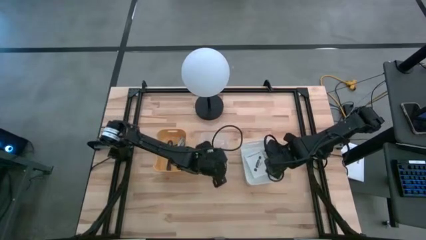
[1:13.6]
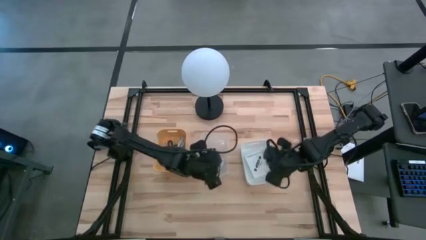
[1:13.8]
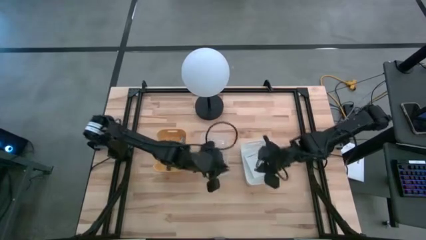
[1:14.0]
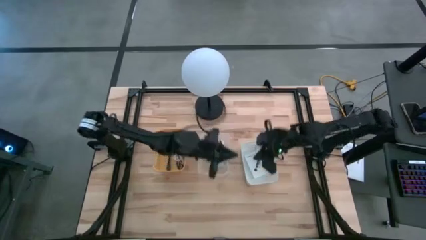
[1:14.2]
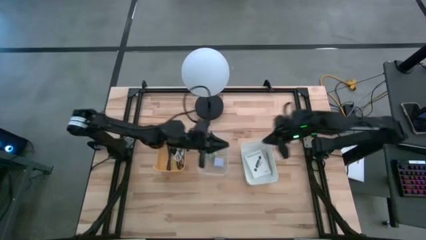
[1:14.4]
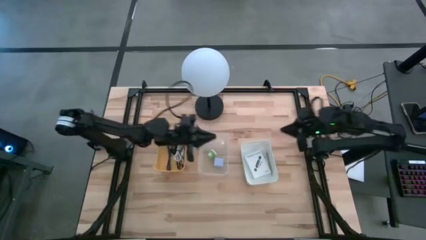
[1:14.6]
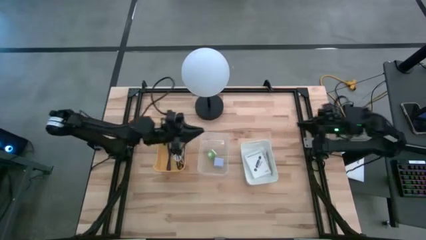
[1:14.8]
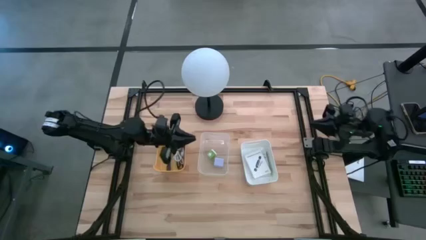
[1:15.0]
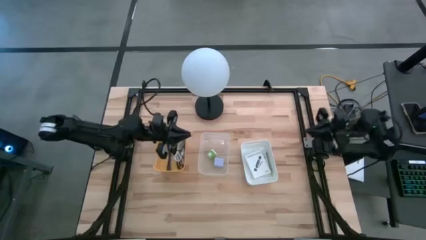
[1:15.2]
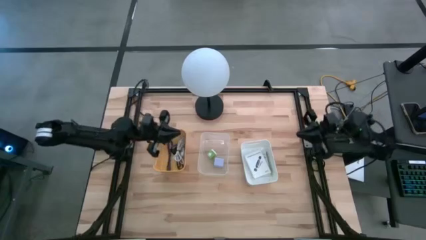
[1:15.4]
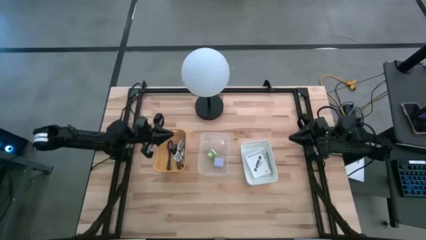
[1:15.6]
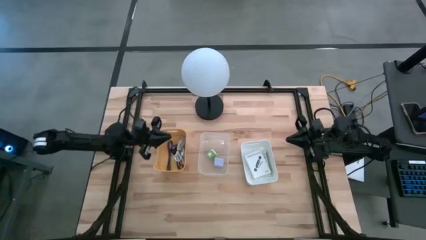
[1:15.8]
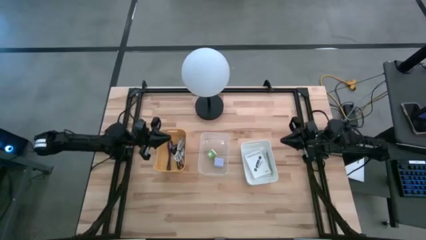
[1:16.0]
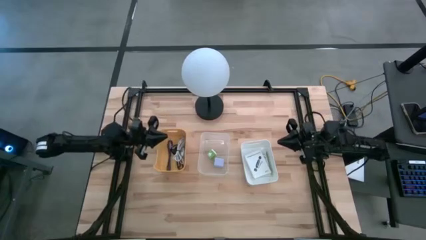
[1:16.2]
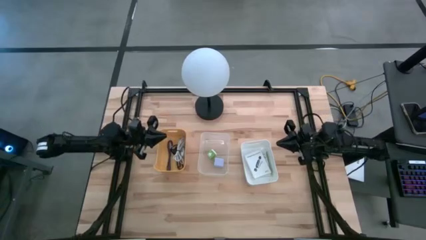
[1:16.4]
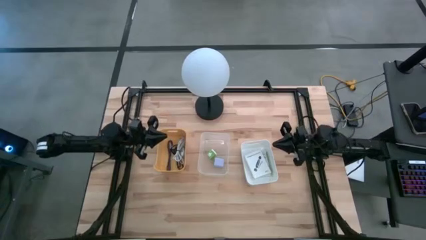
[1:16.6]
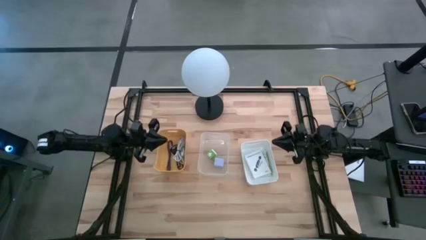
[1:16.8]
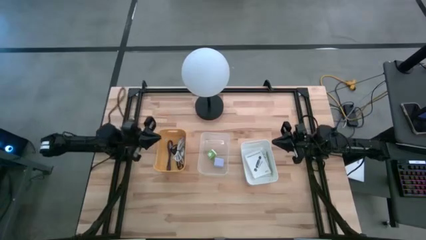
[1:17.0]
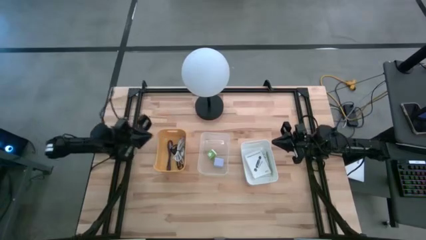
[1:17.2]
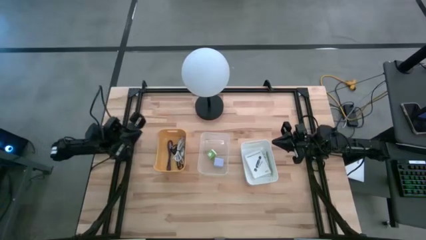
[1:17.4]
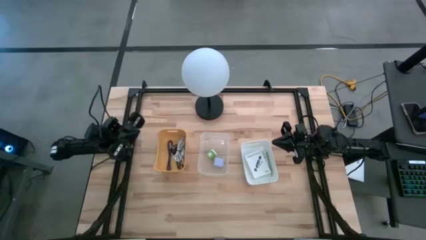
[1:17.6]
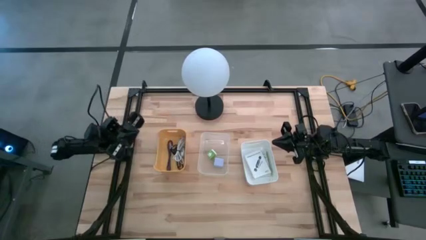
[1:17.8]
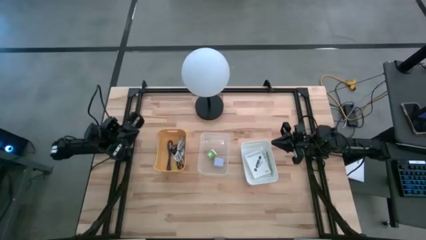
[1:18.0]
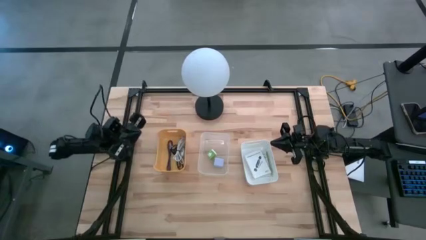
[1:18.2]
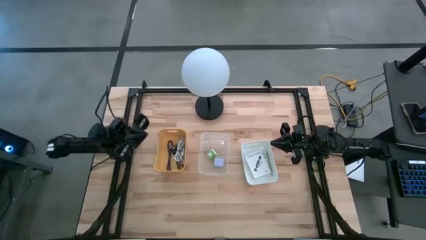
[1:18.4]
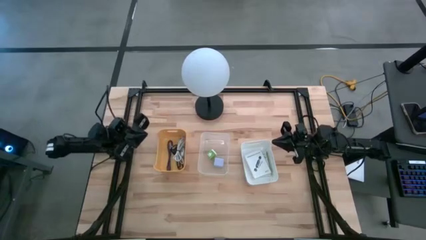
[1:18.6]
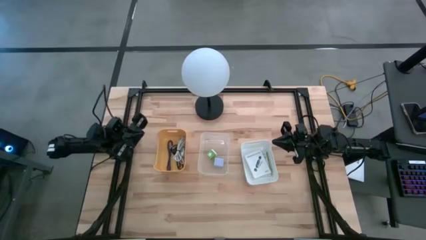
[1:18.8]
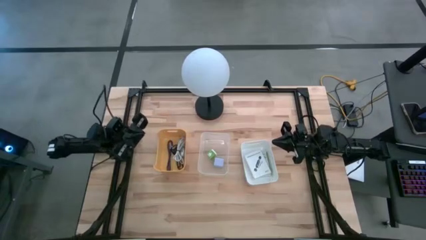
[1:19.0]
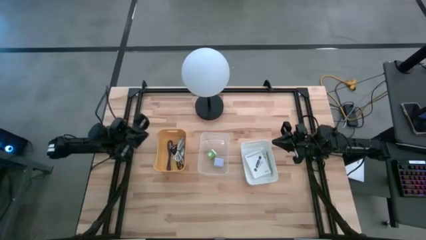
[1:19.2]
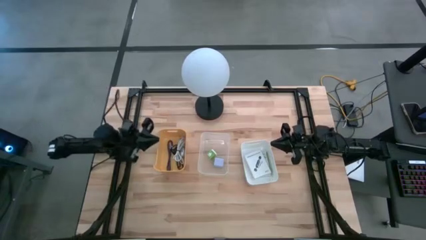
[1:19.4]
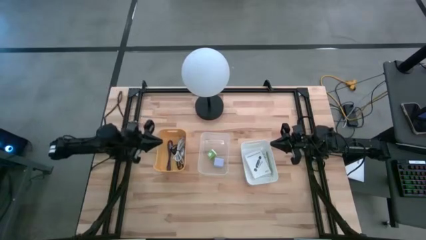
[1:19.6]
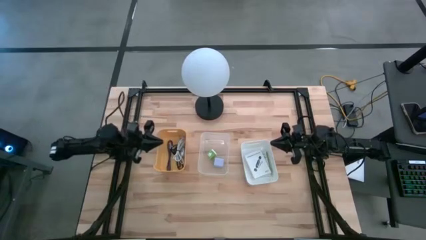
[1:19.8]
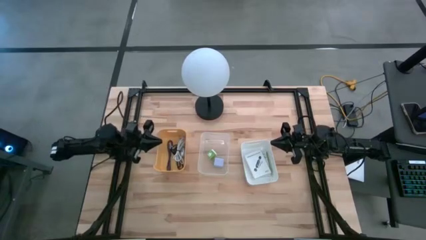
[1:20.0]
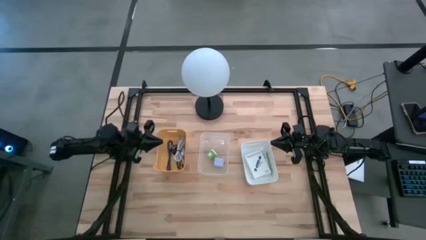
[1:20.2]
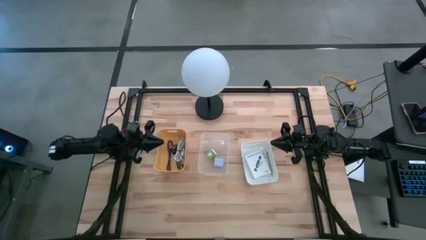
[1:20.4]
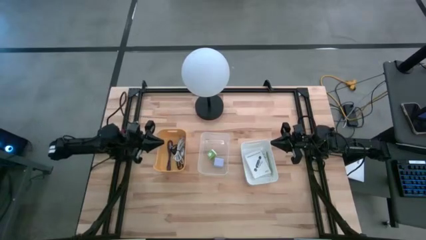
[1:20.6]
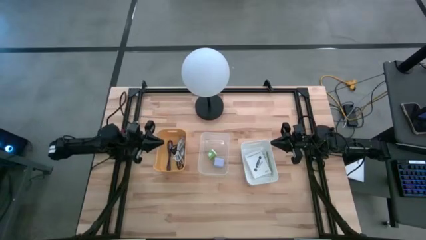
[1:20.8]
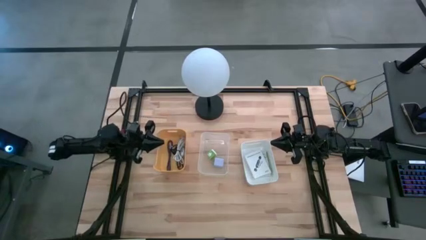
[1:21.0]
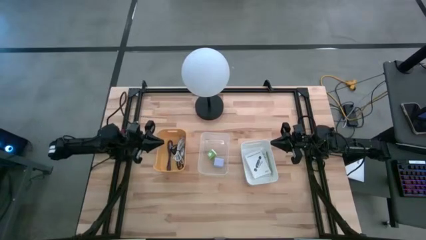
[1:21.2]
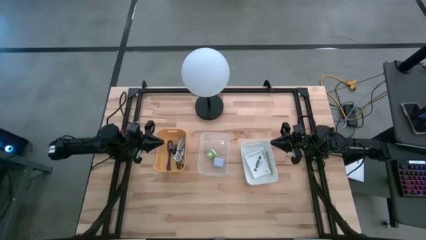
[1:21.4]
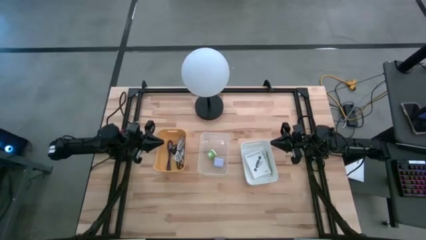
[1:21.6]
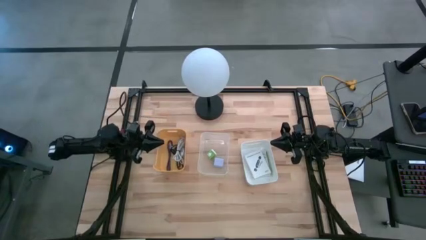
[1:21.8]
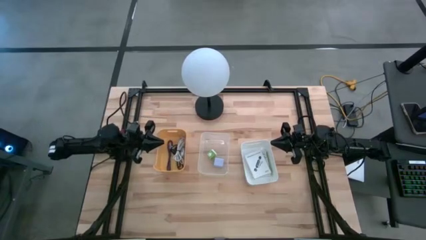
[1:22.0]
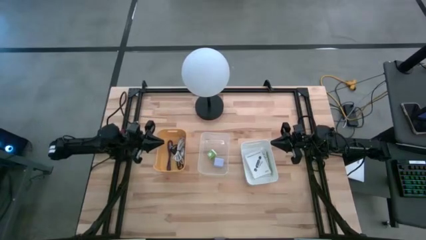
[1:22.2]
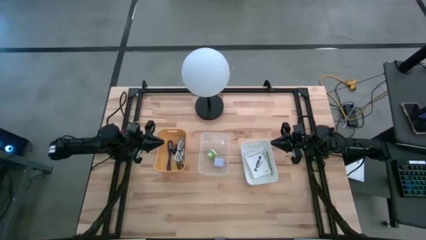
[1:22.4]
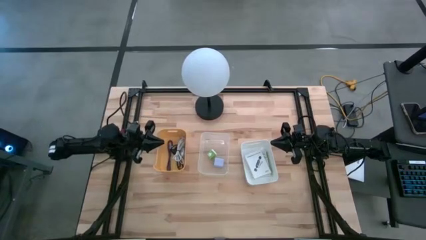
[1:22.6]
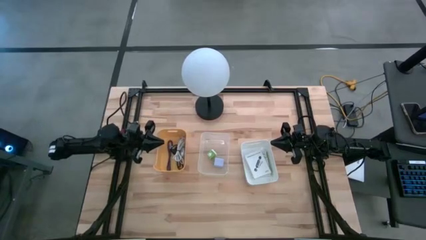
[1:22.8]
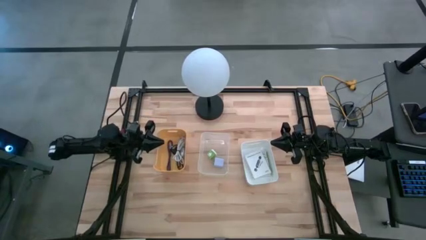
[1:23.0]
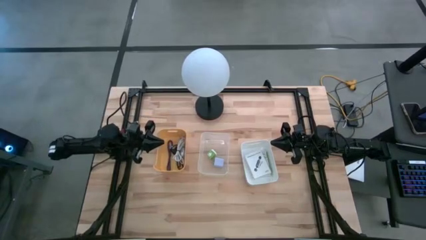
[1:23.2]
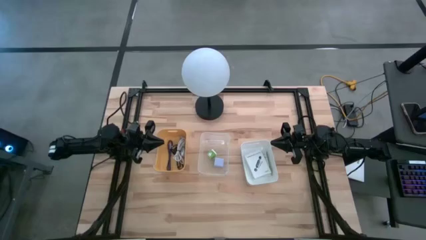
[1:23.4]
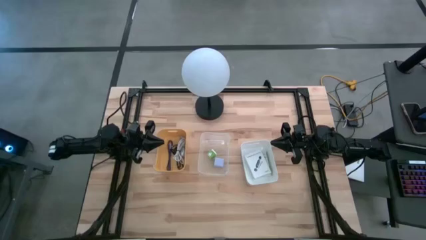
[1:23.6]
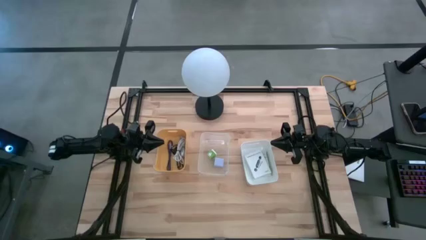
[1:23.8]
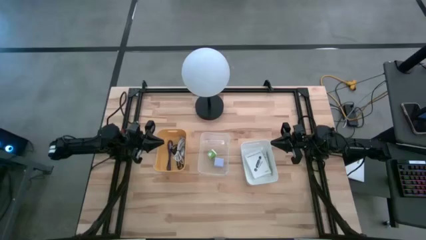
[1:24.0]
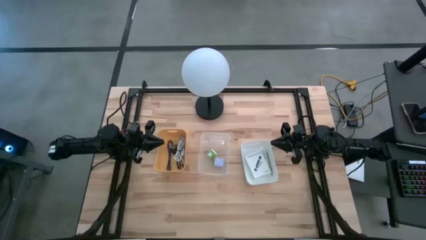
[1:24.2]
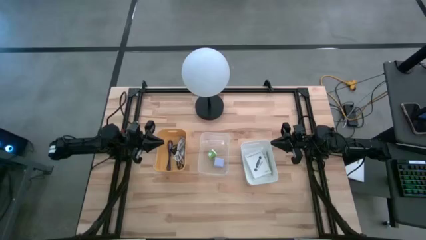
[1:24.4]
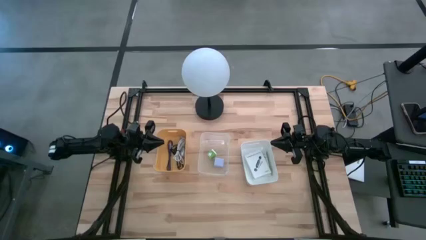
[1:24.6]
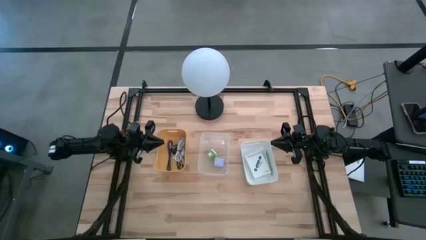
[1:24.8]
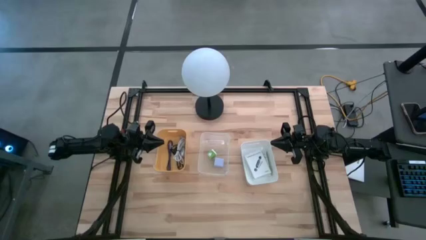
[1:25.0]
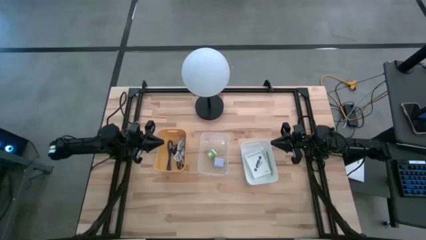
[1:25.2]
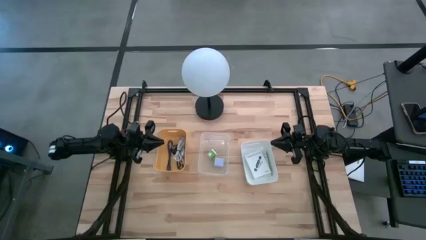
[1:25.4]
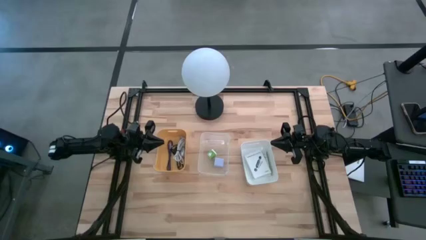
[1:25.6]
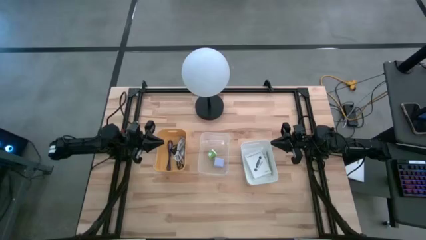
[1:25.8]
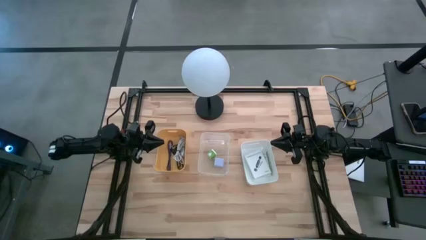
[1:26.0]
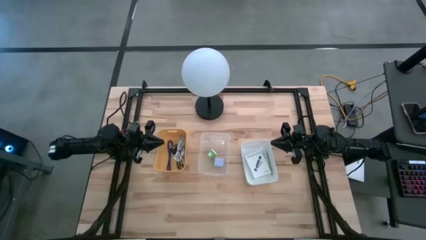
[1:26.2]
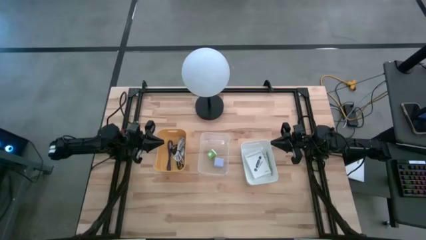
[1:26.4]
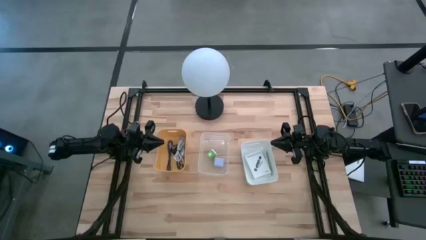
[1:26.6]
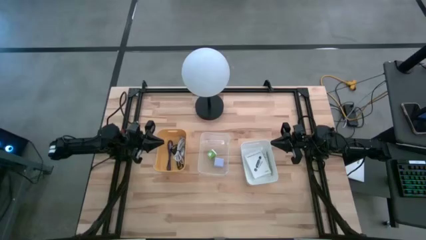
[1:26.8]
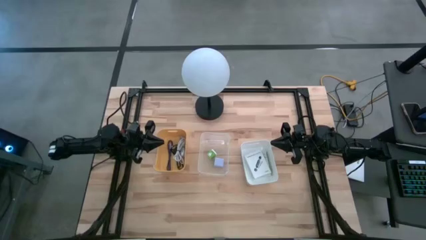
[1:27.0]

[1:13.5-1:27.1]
Task: Pick and place items into bin
Return to Home Position

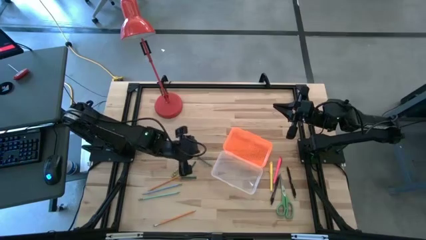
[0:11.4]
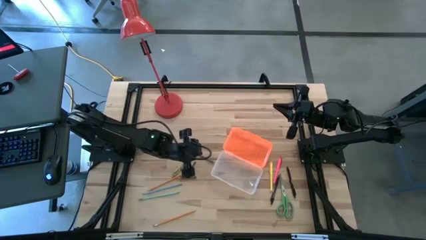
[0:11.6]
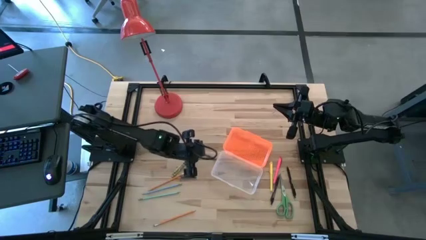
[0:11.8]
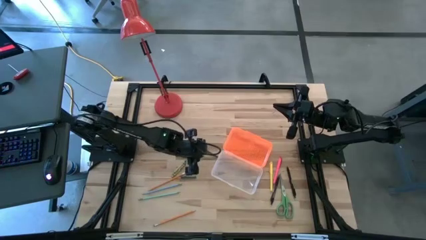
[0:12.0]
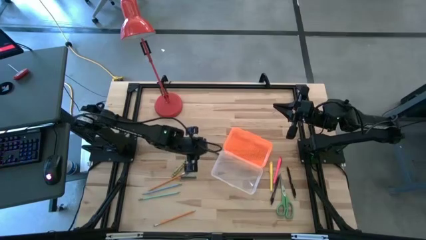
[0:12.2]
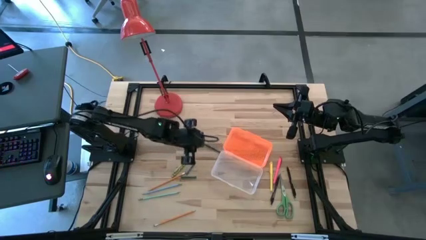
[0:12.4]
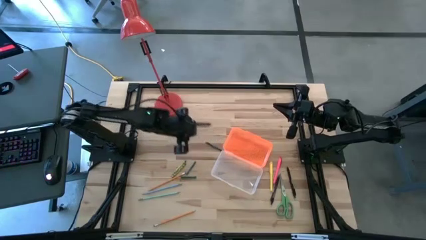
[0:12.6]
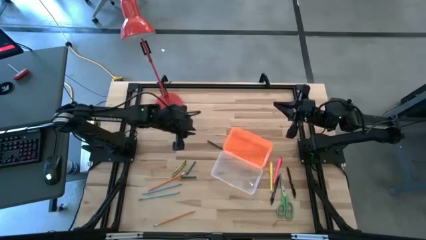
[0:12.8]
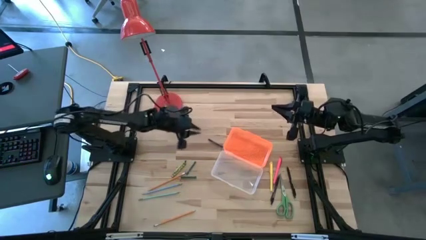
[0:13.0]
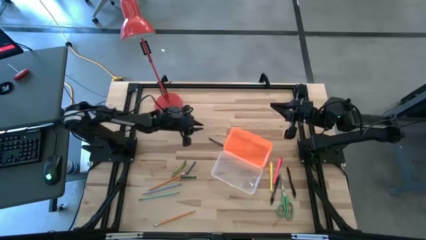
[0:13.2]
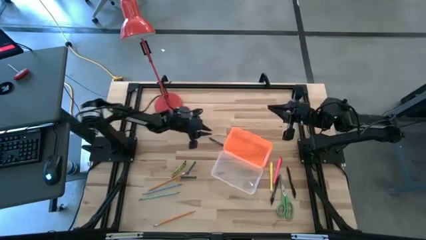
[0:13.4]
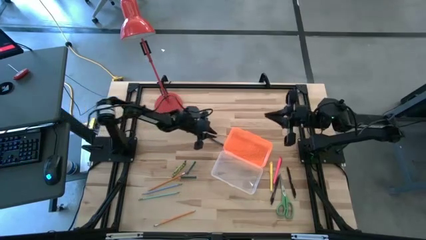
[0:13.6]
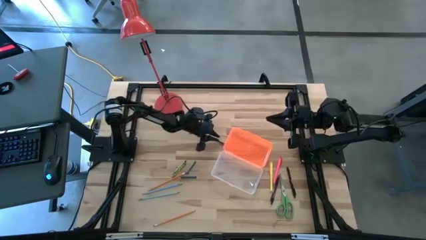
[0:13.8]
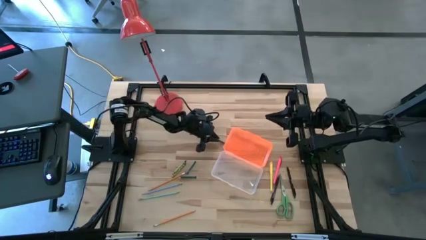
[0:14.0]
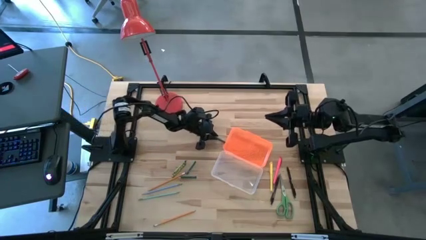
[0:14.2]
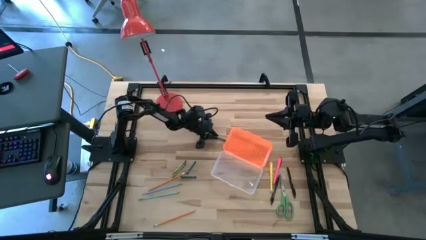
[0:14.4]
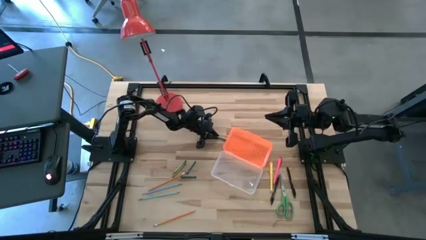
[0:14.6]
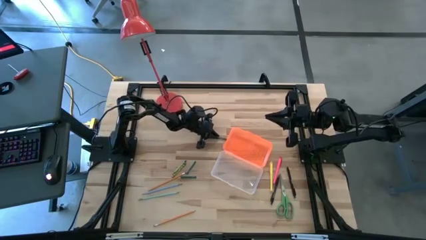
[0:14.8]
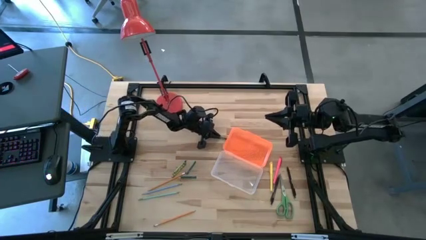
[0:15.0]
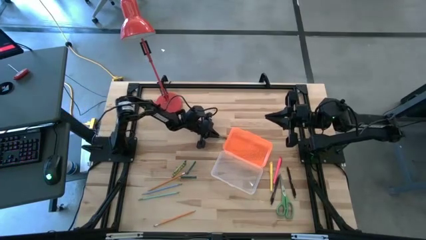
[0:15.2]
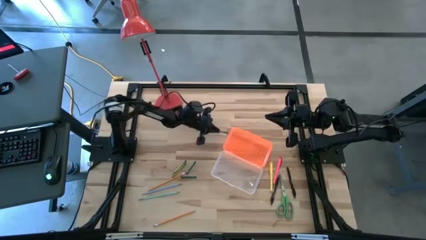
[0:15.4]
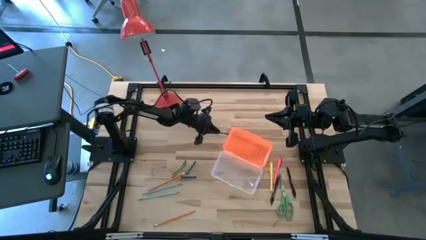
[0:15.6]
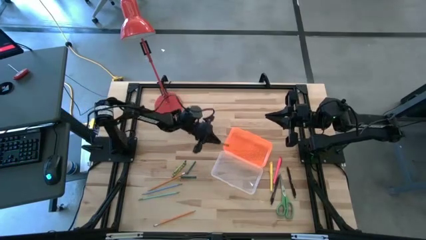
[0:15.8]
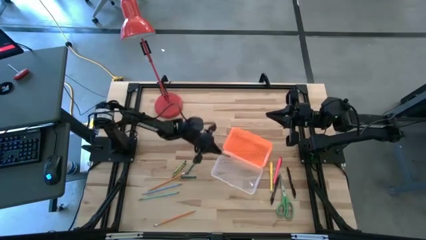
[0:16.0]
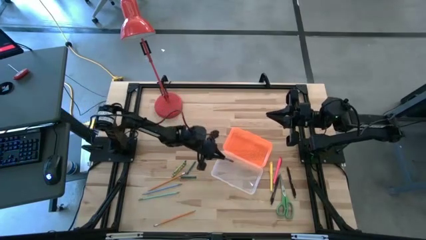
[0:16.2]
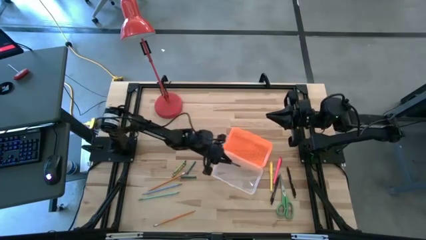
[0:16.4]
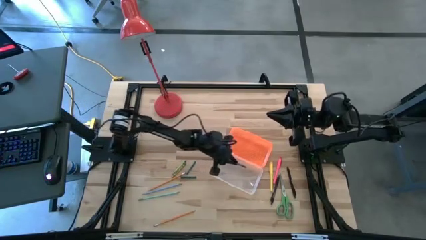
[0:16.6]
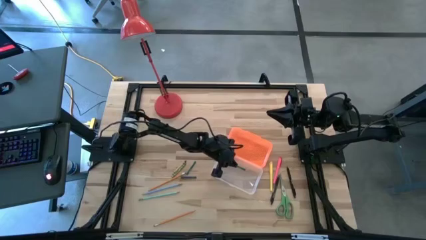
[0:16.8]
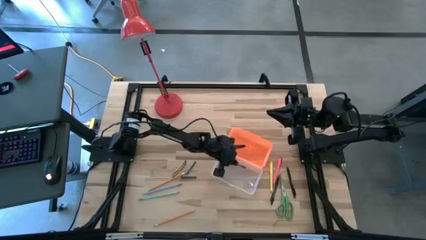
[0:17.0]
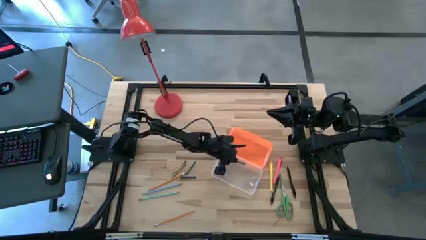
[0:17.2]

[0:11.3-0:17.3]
Task: Pick & place school supplies into a supply box
Put the top left green crayon into the supply box
